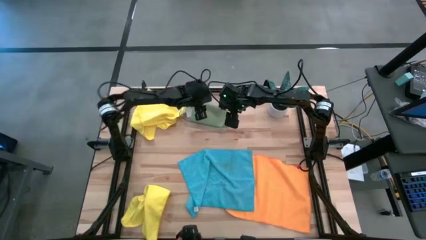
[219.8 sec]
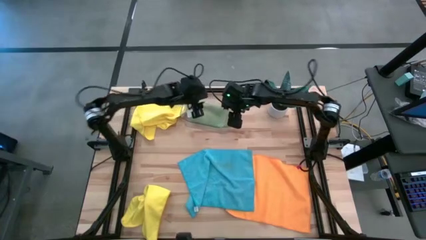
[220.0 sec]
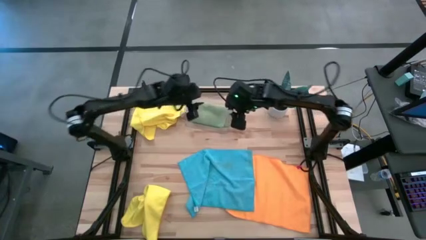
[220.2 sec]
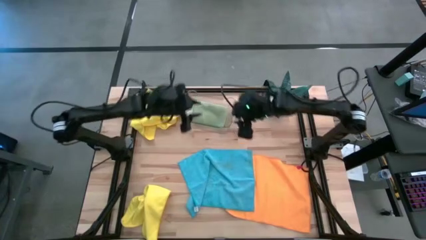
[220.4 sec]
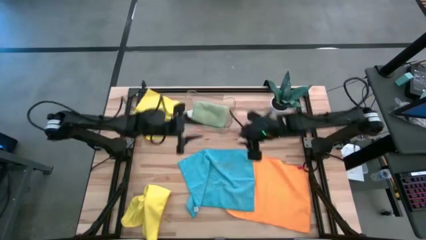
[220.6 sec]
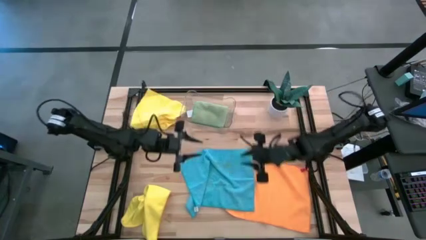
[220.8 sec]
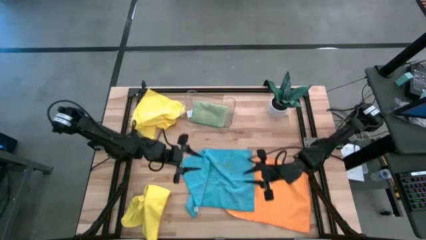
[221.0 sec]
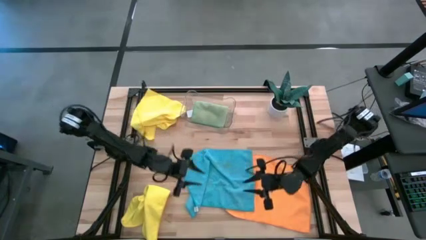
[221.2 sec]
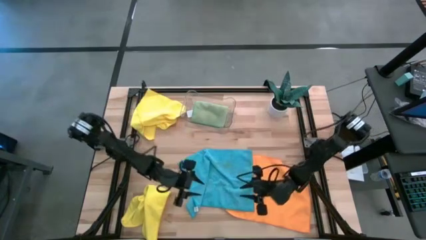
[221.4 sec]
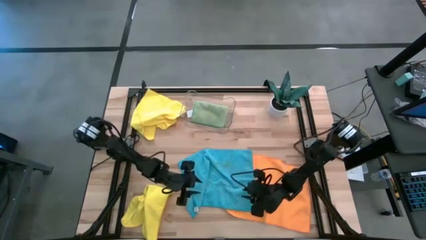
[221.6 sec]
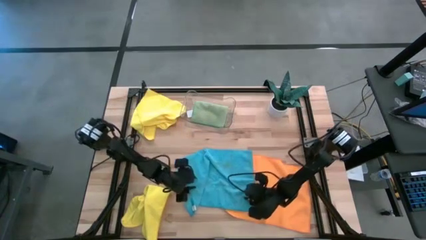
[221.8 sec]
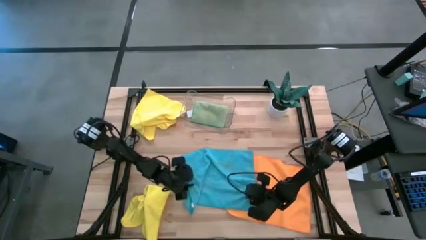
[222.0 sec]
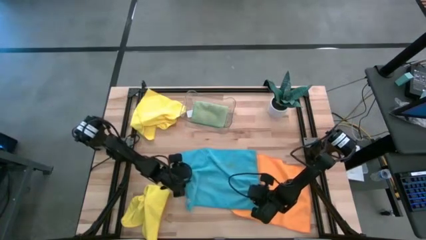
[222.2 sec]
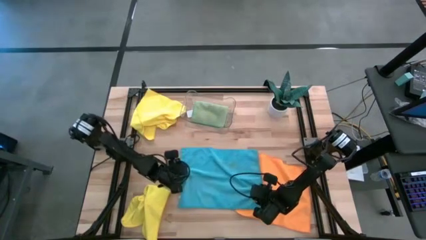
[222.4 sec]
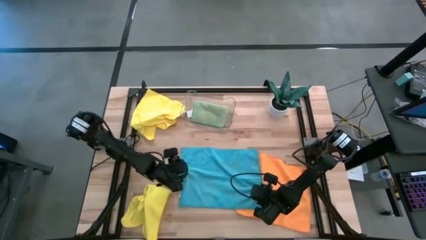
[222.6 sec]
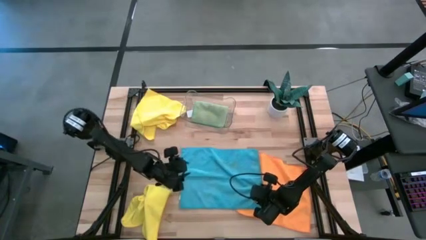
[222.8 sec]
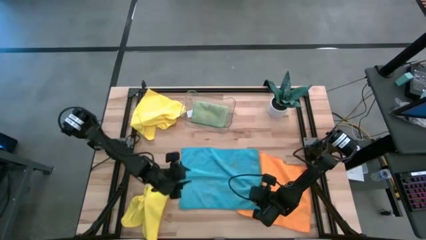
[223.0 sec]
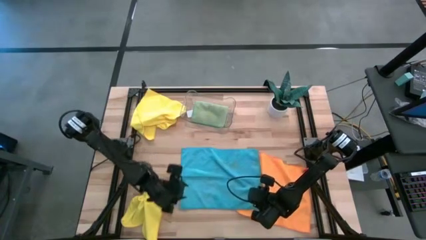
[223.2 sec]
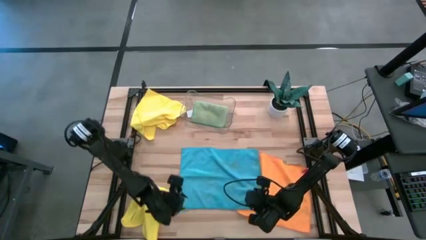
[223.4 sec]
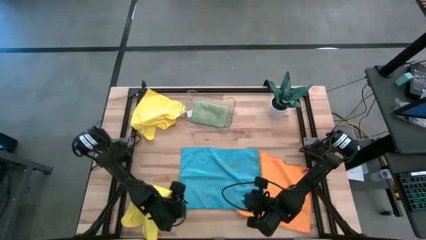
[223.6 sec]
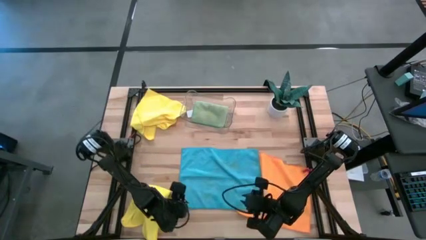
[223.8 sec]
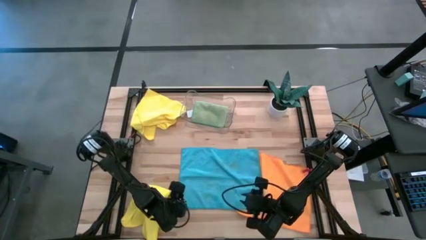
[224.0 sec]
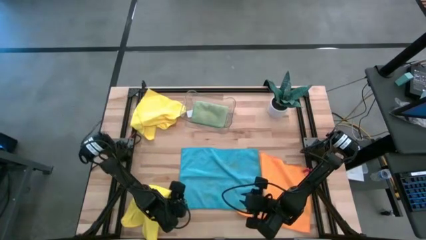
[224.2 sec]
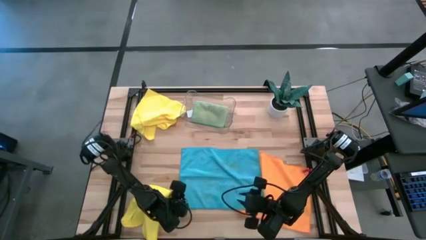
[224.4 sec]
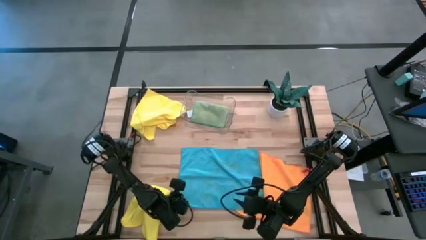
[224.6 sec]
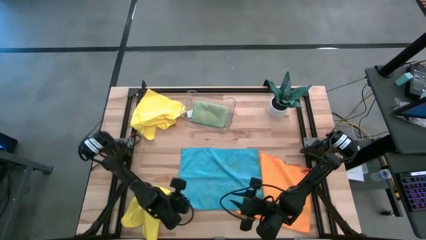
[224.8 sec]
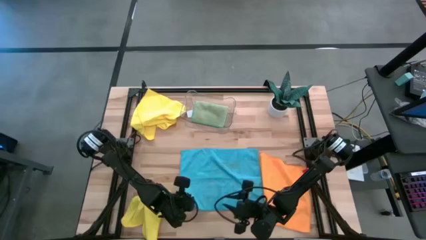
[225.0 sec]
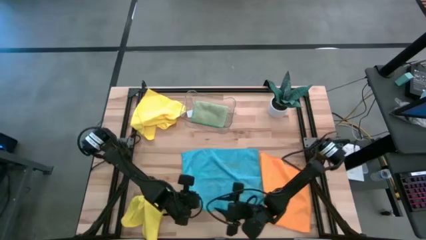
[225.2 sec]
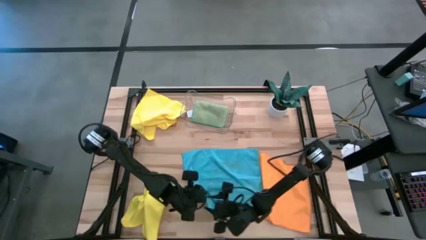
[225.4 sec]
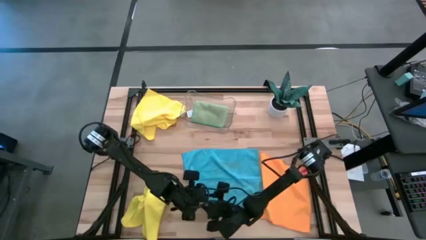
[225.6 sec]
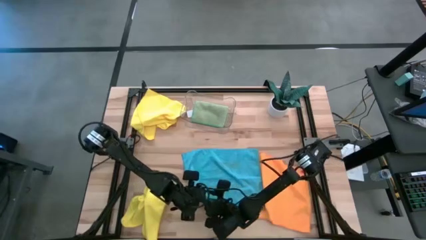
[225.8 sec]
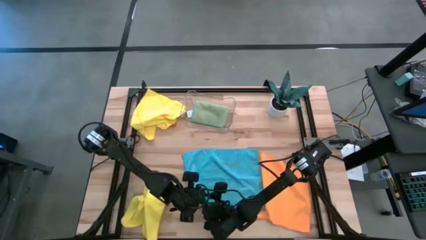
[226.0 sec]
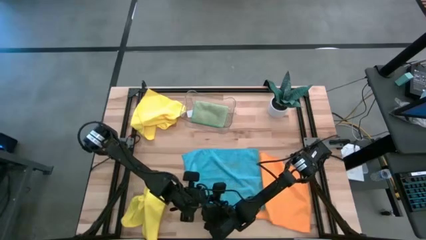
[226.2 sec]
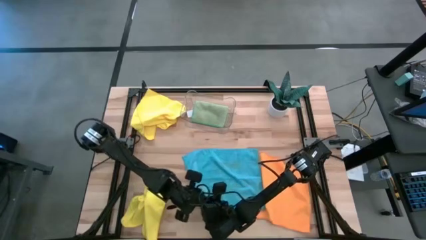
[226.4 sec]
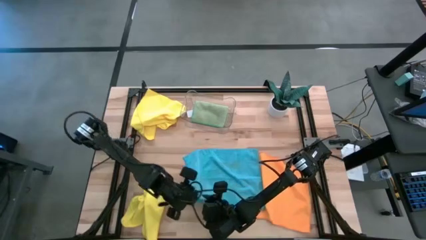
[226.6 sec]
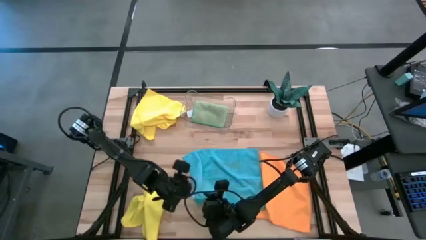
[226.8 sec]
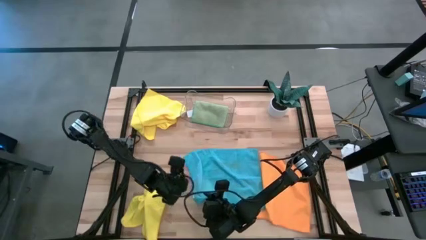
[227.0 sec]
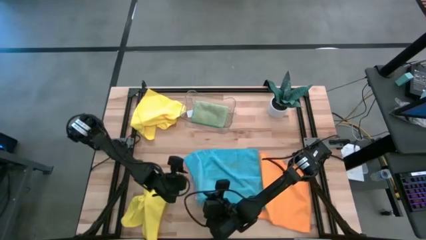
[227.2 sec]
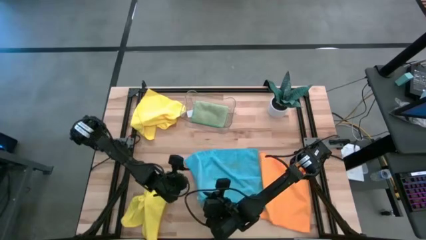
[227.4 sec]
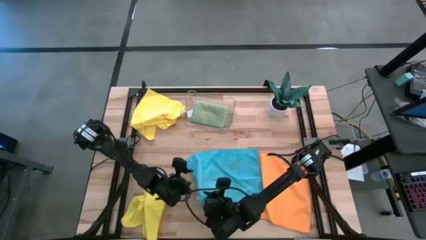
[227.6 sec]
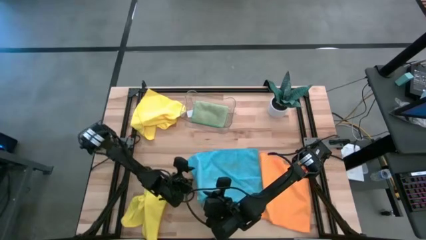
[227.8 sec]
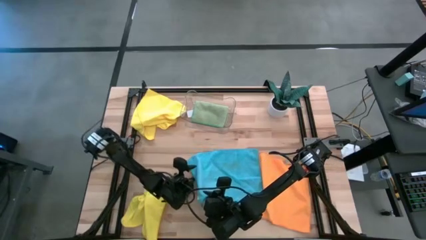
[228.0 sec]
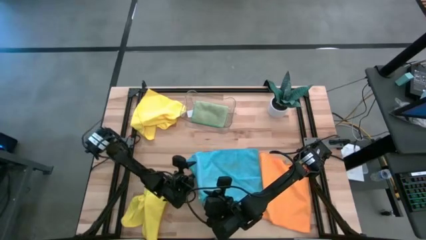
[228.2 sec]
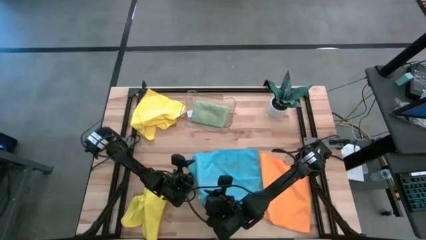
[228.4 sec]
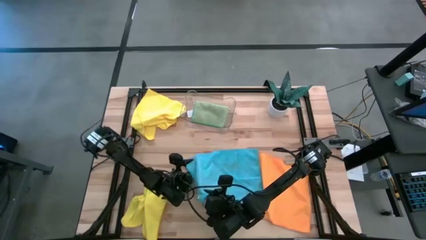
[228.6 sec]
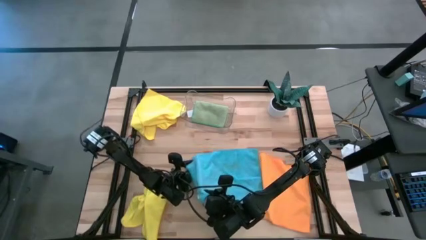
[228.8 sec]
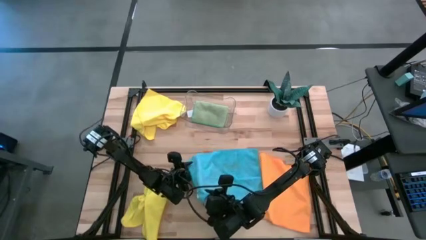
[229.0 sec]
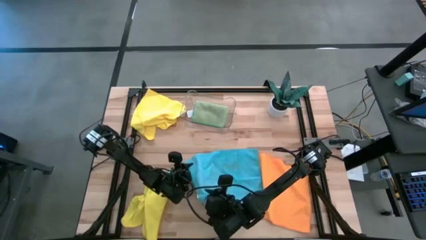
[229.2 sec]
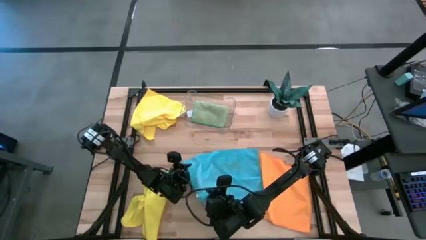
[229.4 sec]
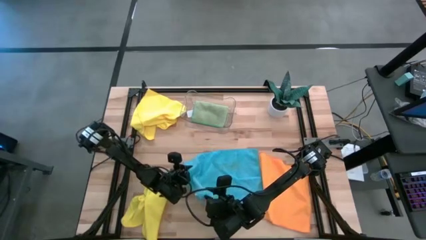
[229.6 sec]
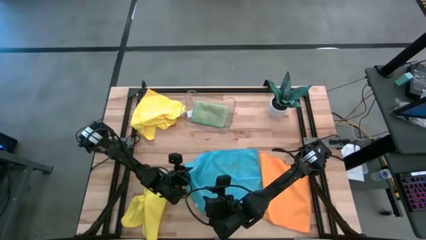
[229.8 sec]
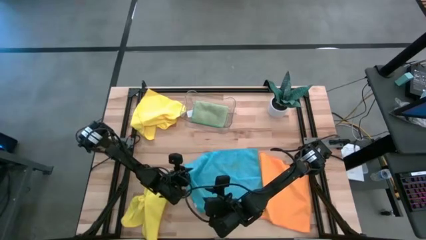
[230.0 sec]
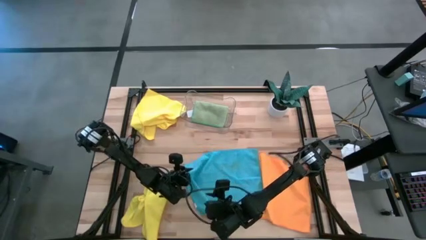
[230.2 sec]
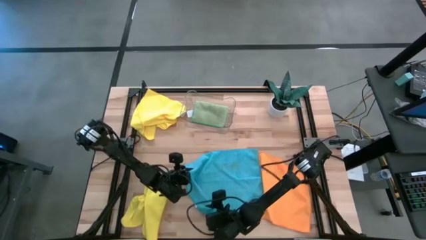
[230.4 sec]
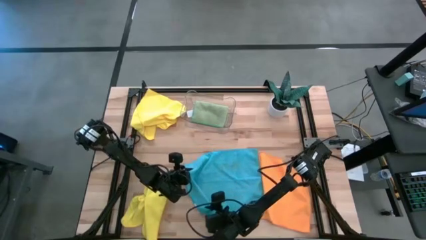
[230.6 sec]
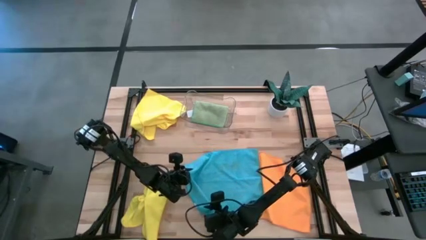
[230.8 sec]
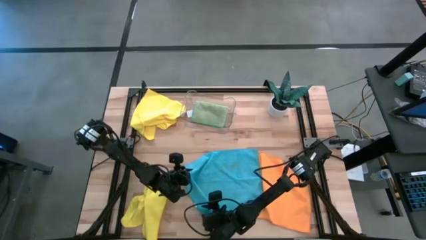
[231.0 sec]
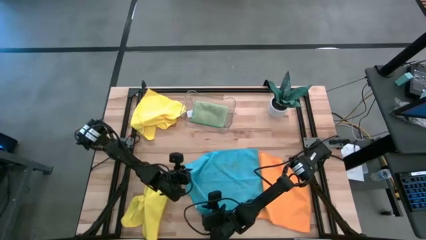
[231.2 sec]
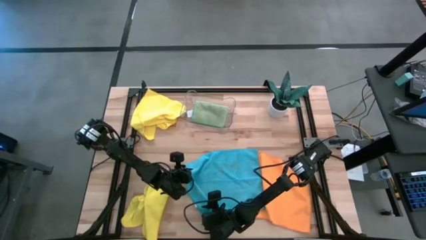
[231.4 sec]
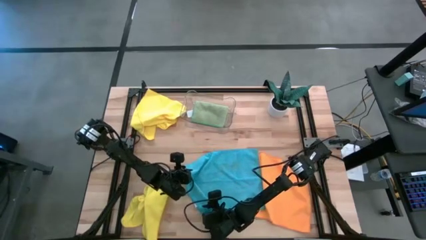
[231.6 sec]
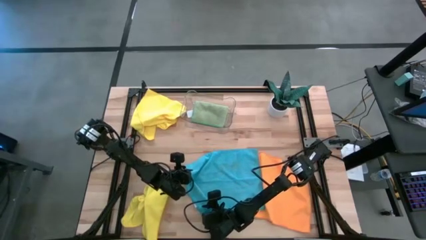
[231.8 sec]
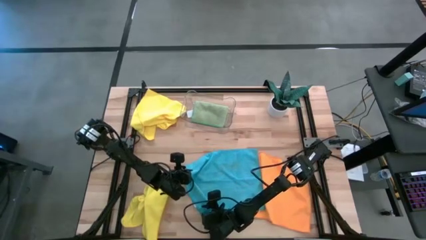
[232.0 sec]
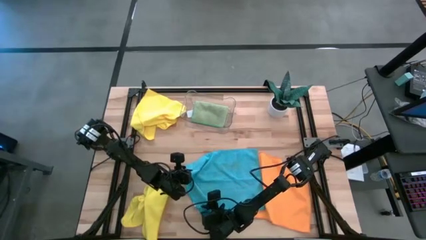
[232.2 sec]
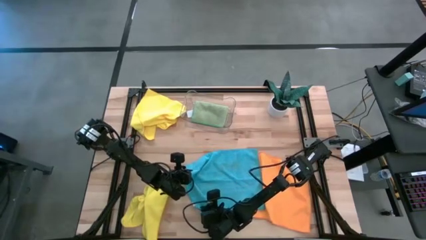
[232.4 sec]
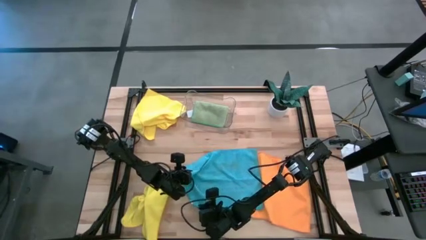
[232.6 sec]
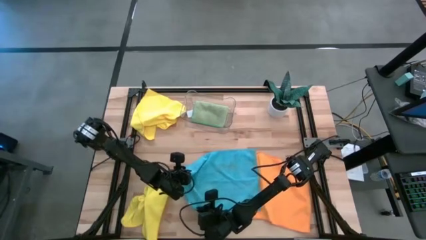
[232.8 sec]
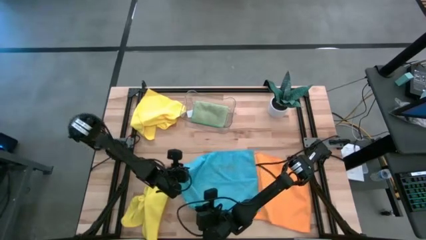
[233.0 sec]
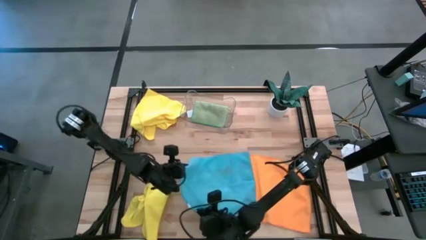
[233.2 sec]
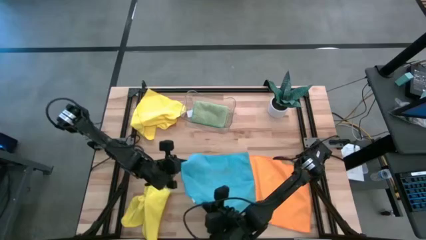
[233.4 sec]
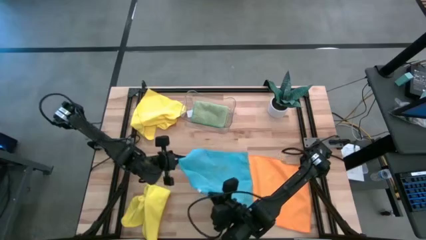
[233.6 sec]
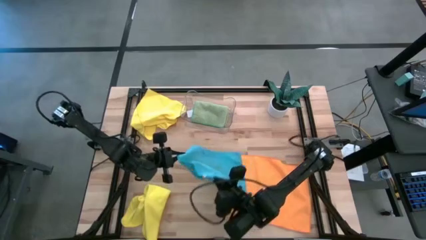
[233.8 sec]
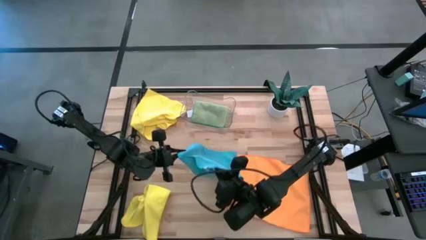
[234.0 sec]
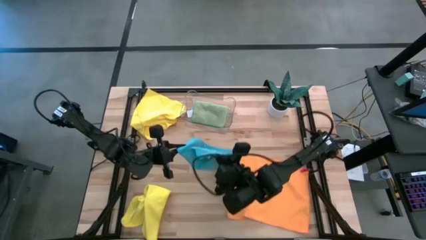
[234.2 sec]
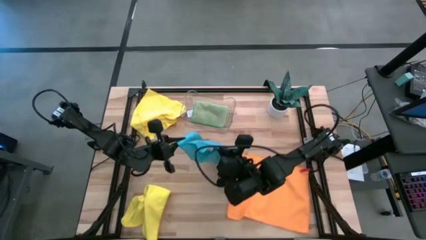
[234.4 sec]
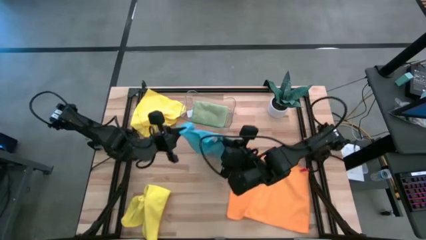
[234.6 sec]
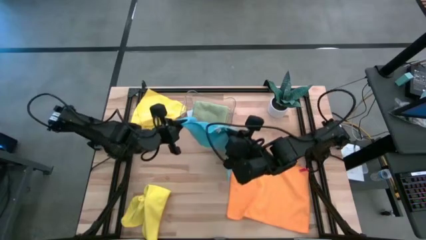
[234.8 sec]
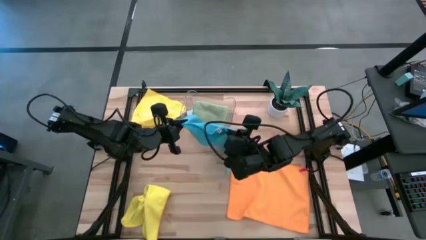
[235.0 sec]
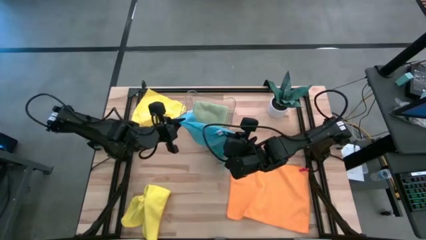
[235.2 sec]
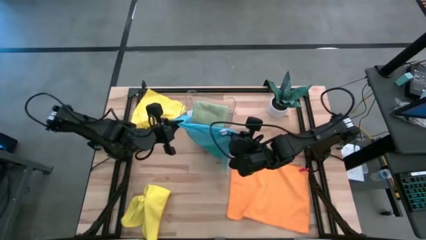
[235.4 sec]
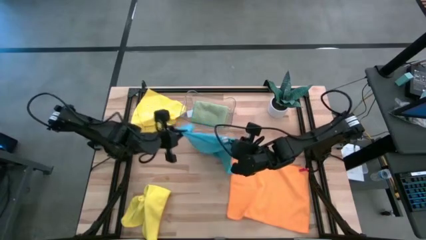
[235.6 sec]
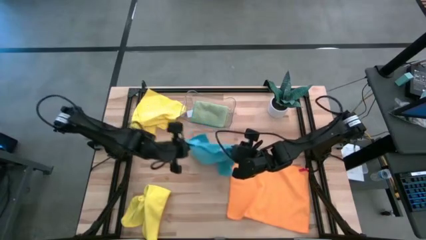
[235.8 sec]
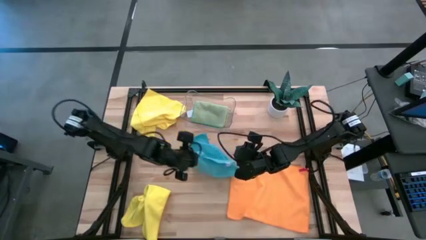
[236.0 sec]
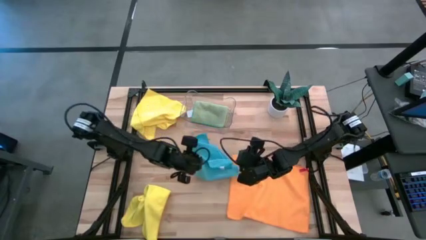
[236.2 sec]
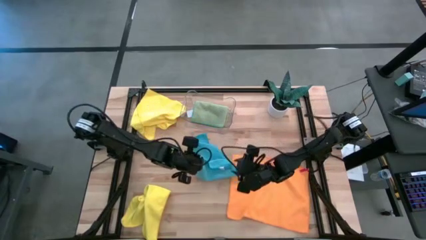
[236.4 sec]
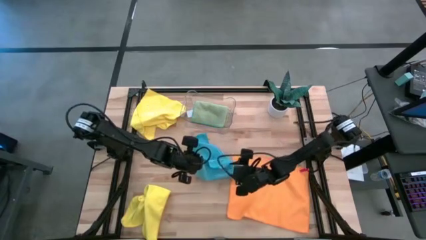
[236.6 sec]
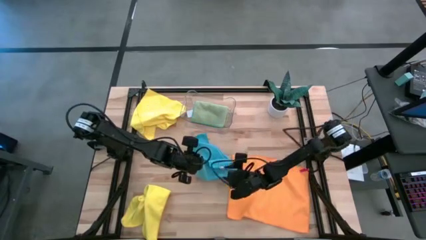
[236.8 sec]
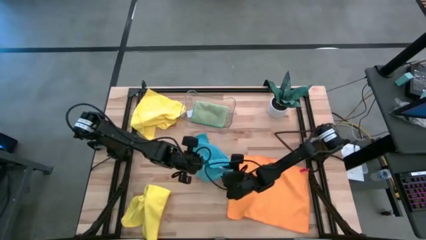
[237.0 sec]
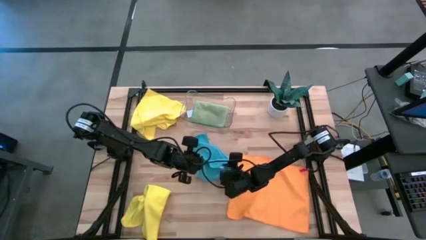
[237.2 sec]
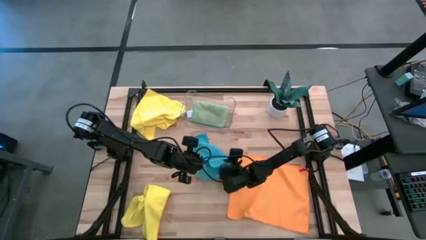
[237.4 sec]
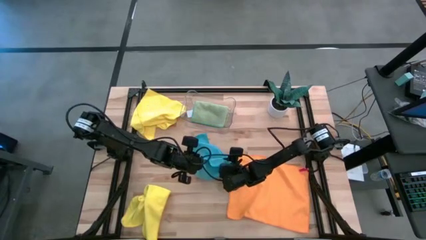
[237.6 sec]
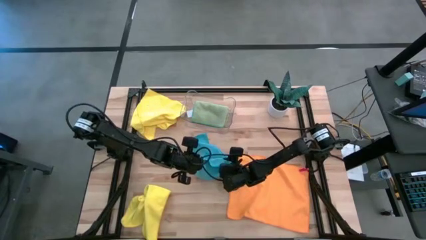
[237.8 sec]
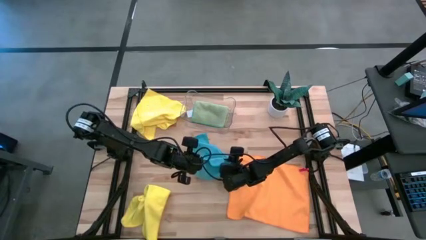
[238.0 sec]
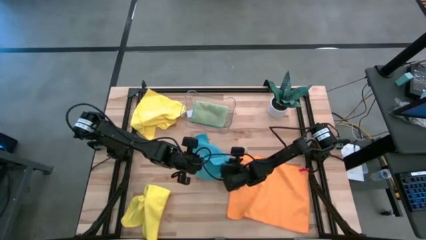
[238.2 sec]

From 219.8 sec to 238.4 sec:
Task: Fold microfiber towels
Fold the blue towel
